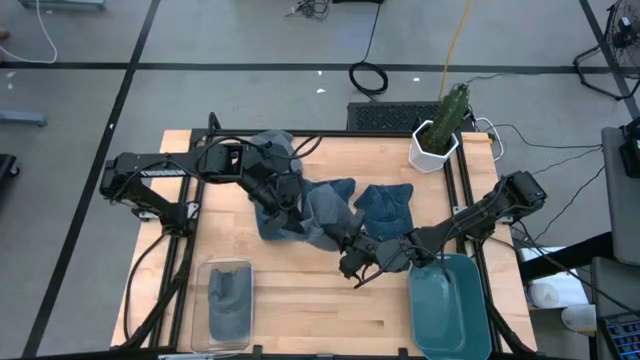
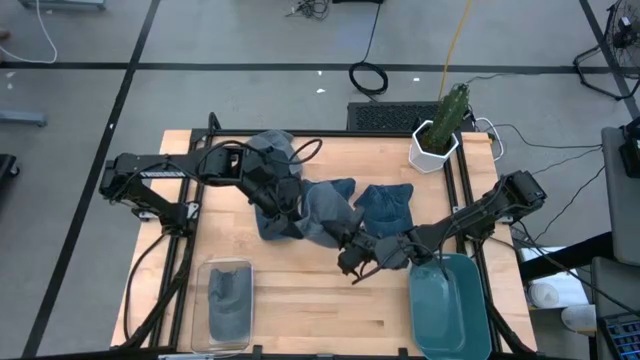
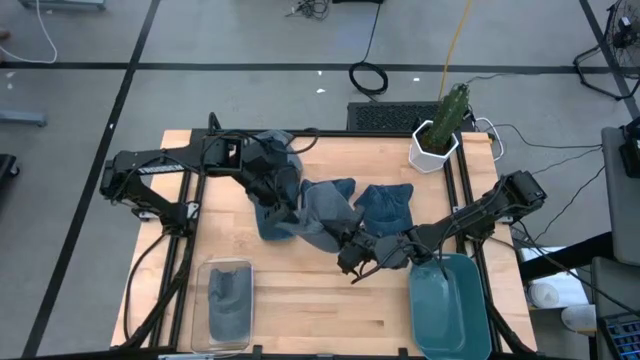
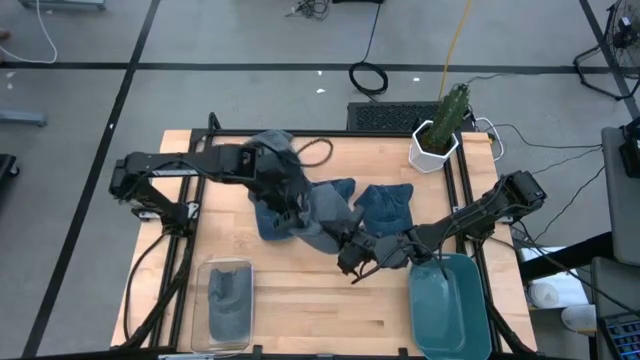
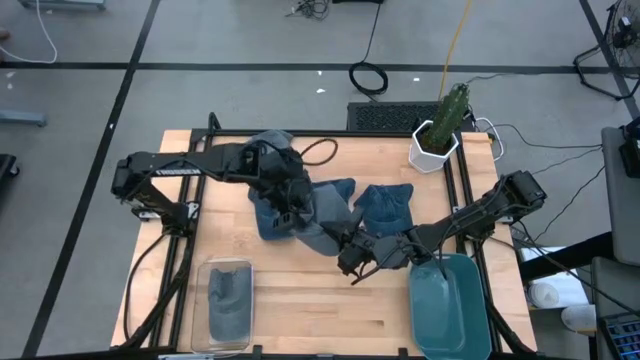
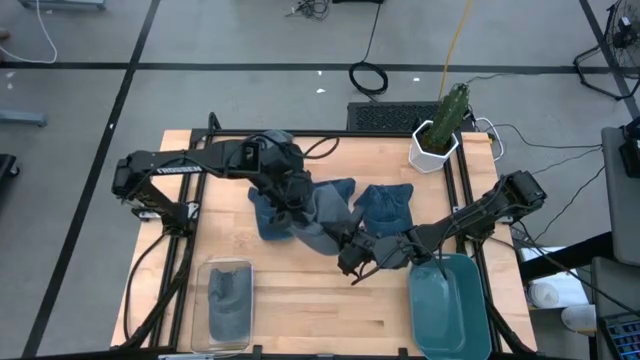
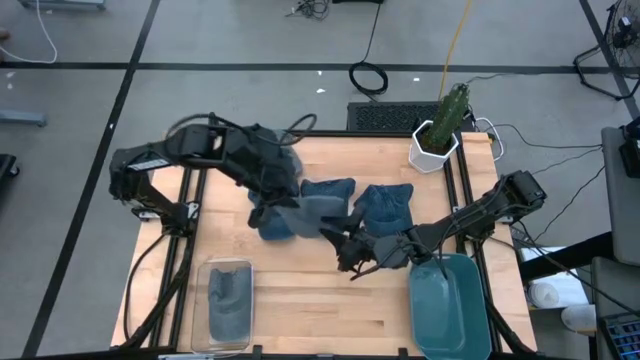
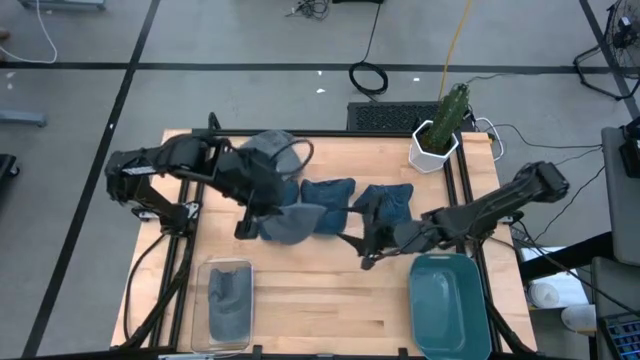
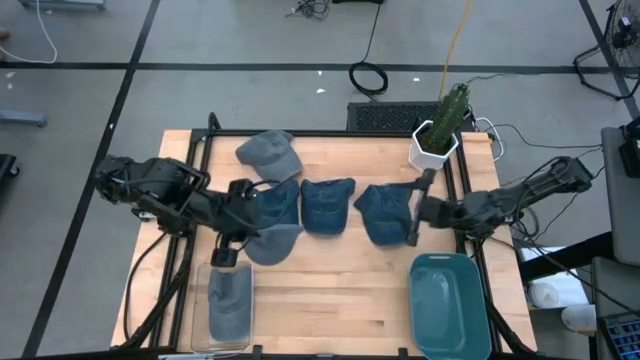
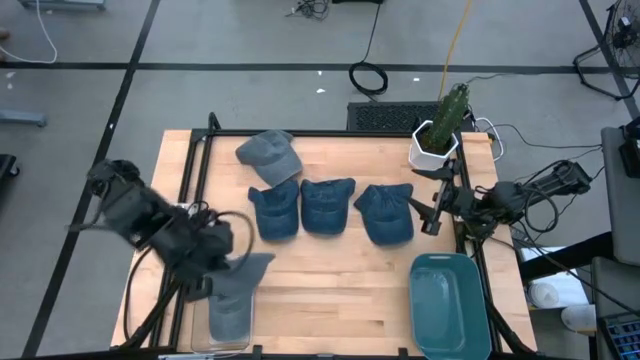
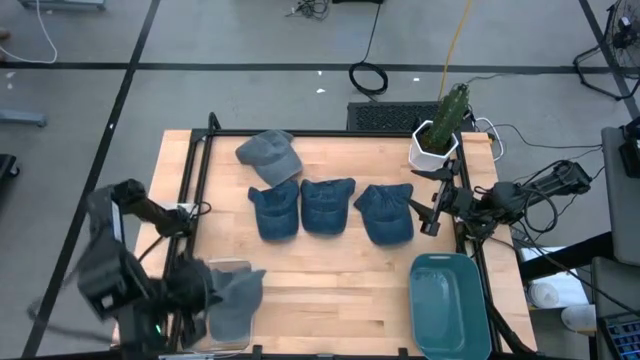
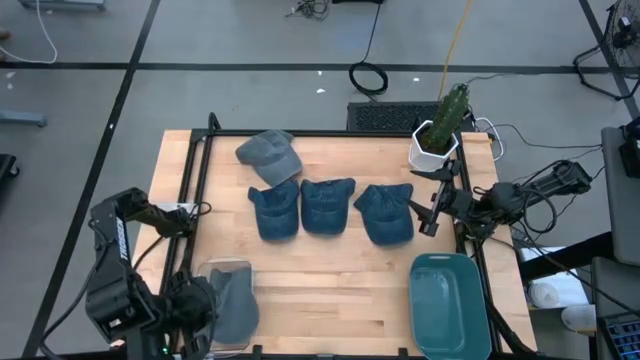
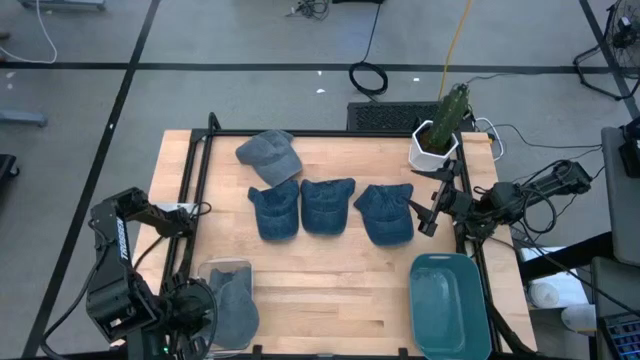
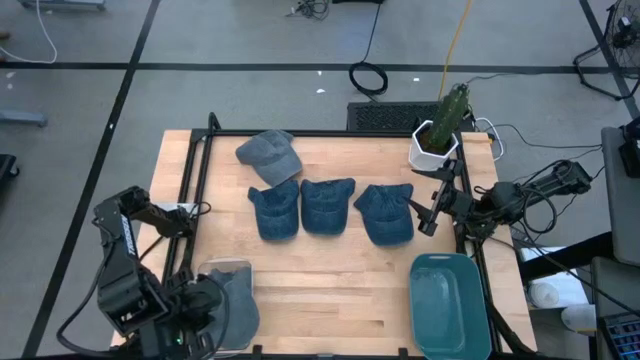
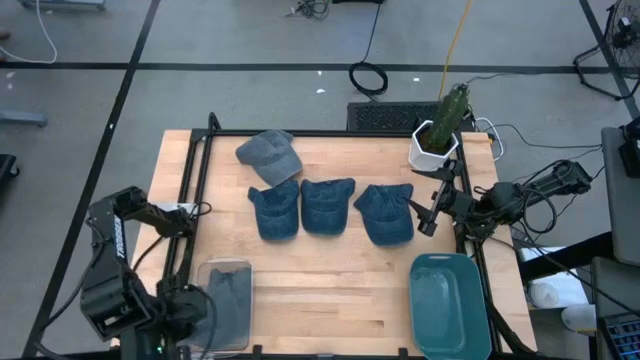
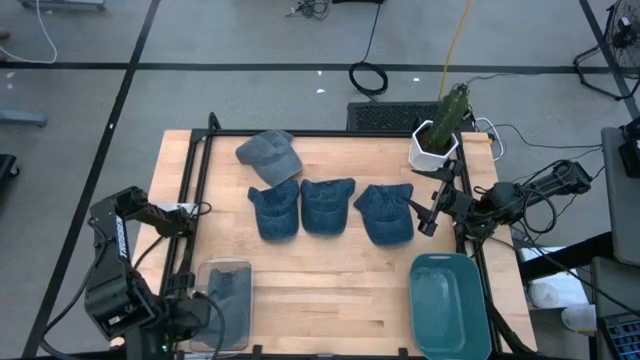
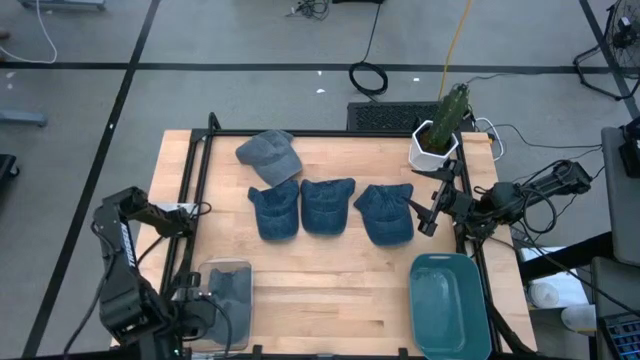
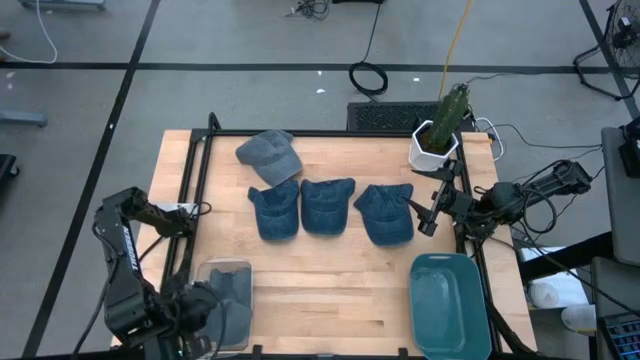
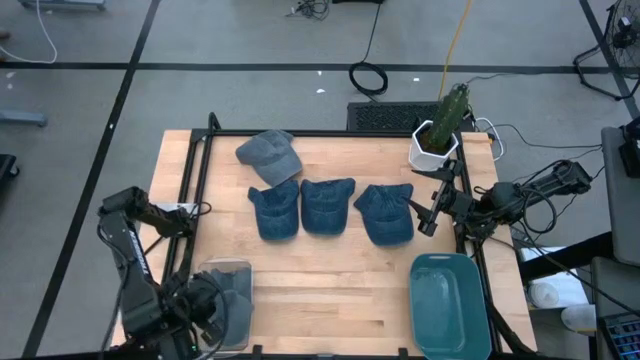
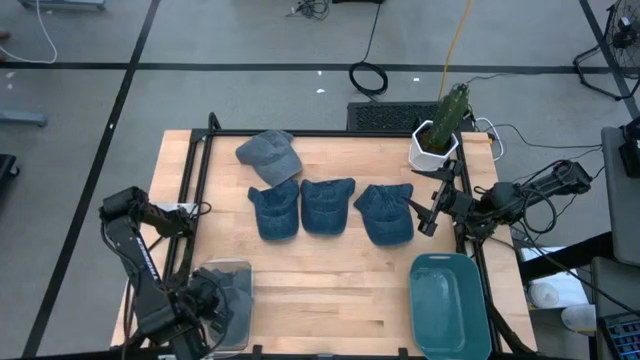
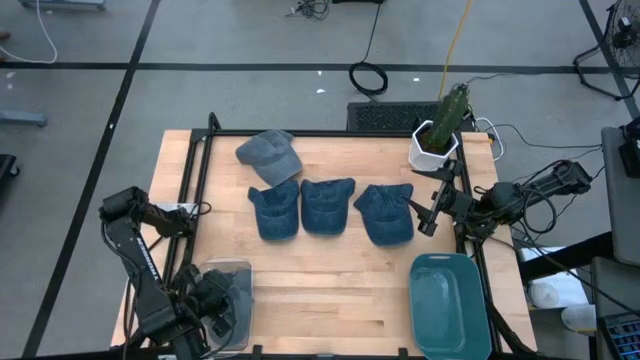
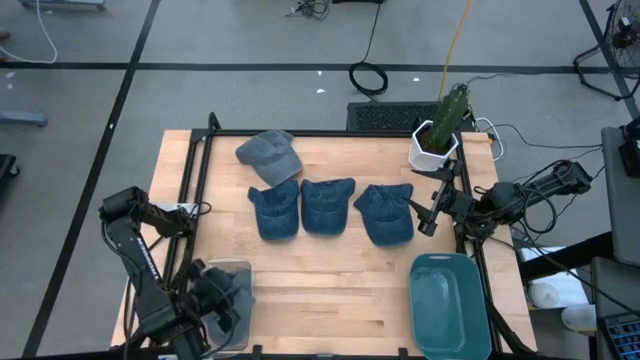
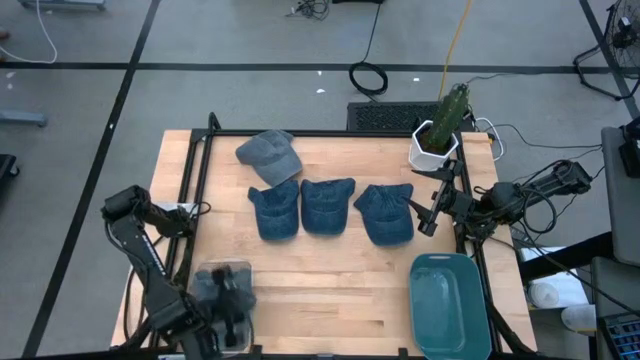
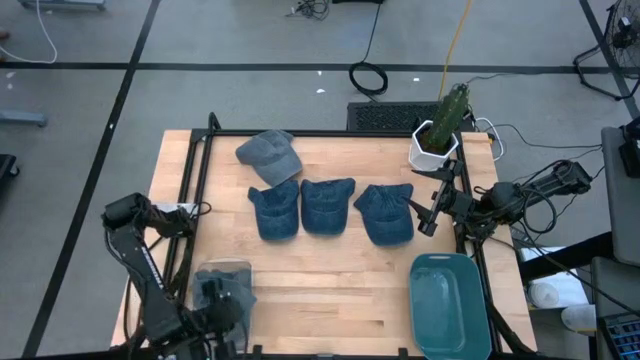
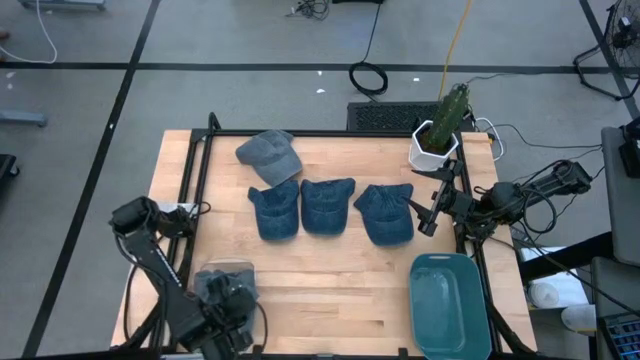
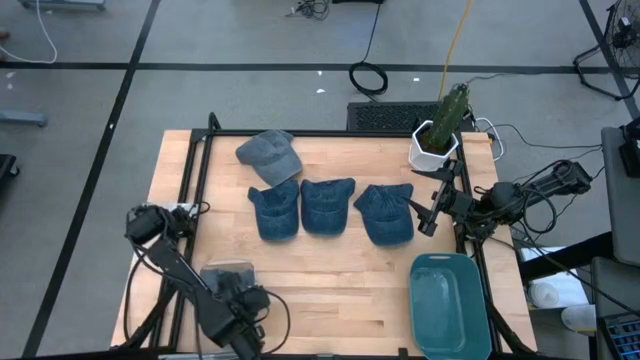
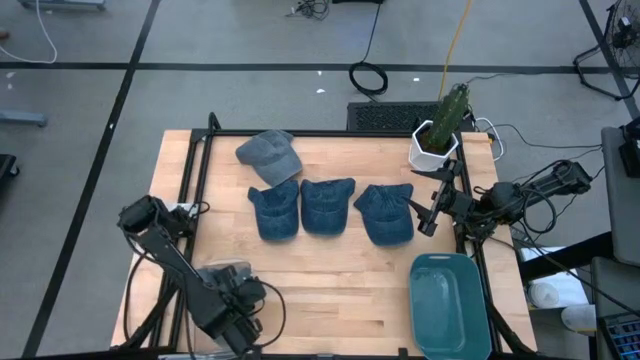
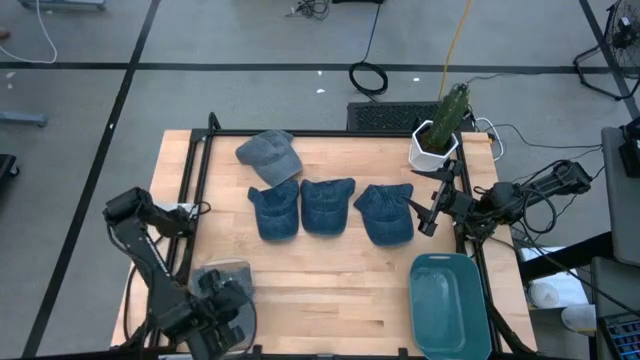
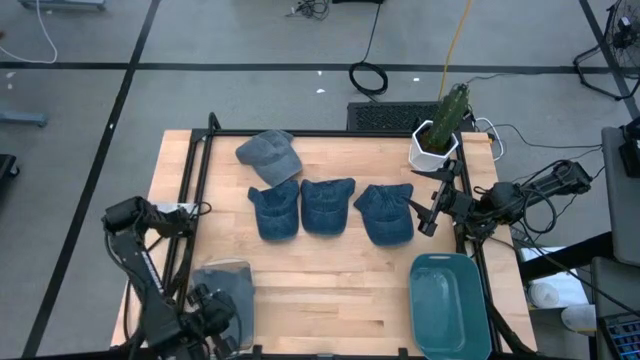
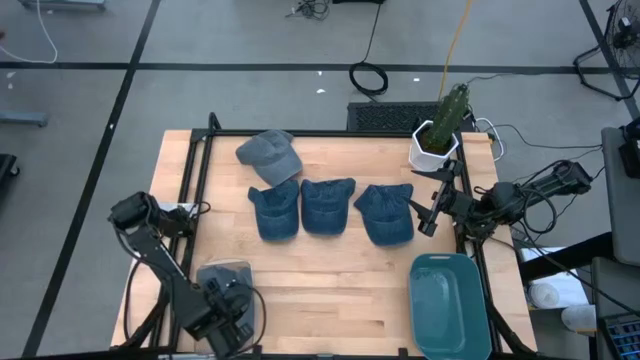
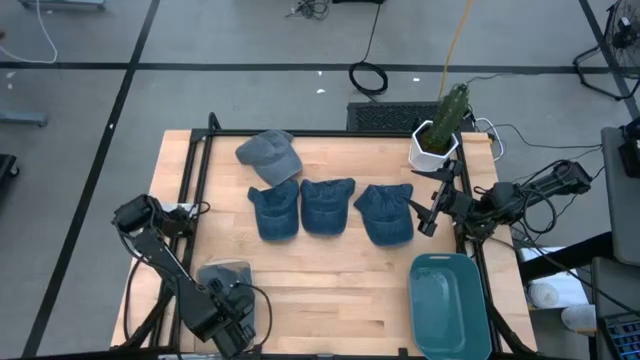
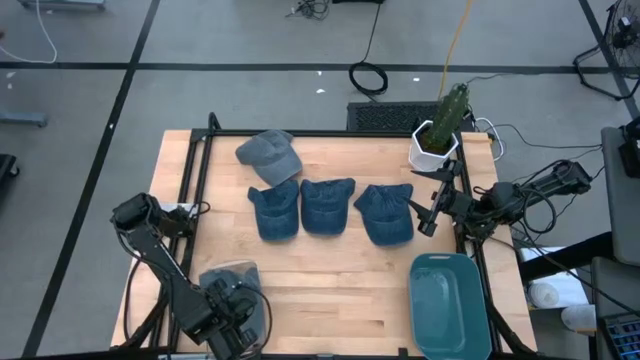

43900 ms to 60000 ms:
Task: Pick & Place hat
Put the right gray cap into the transparent bin
